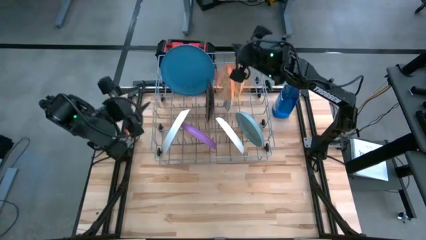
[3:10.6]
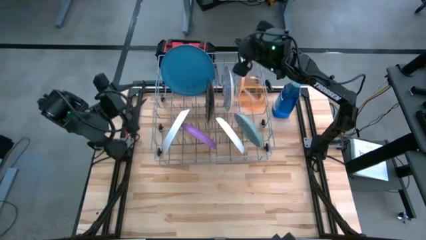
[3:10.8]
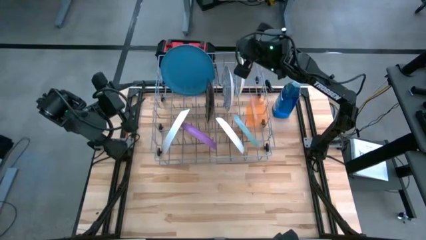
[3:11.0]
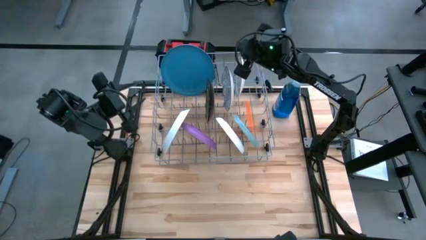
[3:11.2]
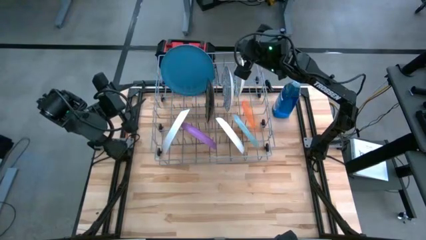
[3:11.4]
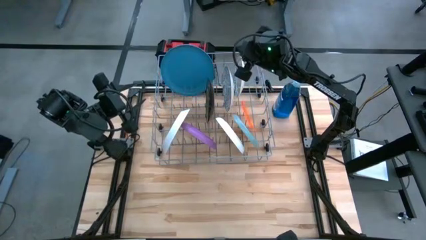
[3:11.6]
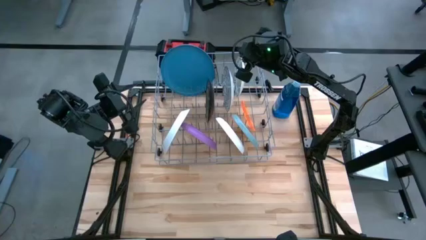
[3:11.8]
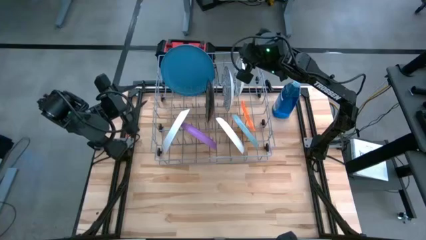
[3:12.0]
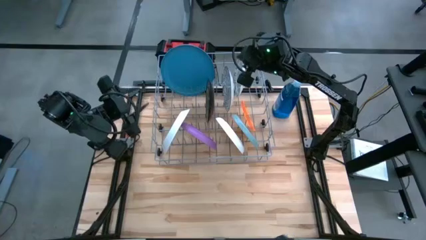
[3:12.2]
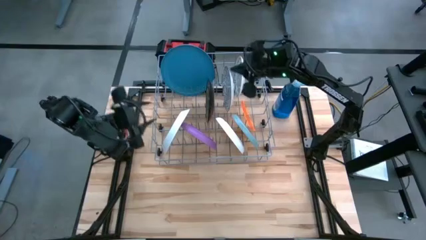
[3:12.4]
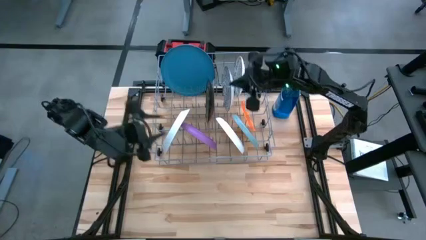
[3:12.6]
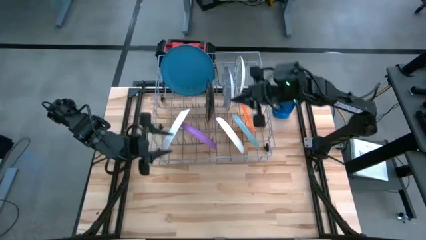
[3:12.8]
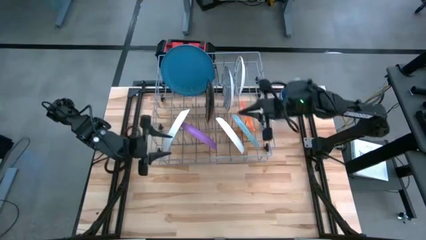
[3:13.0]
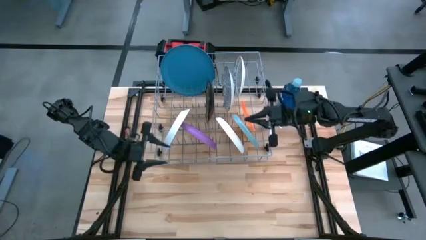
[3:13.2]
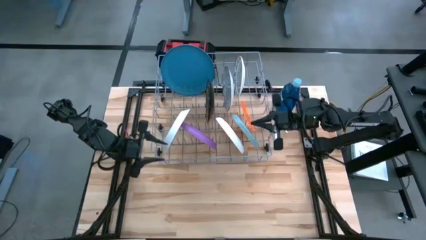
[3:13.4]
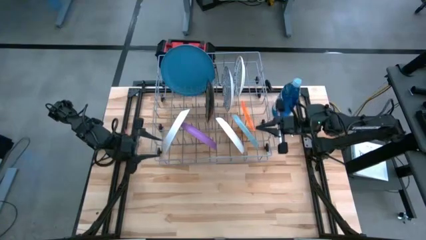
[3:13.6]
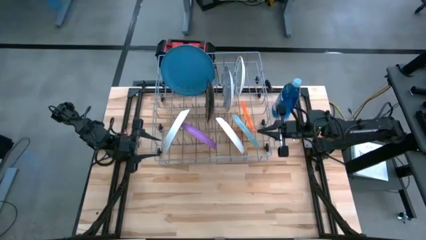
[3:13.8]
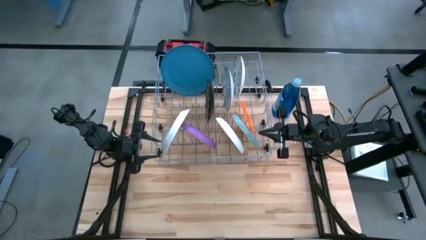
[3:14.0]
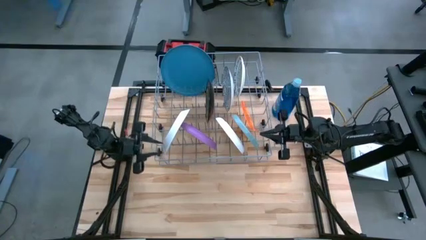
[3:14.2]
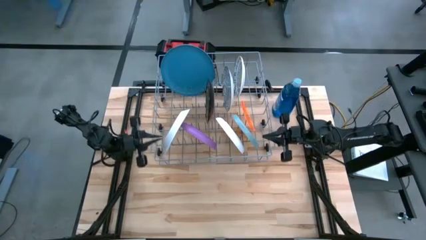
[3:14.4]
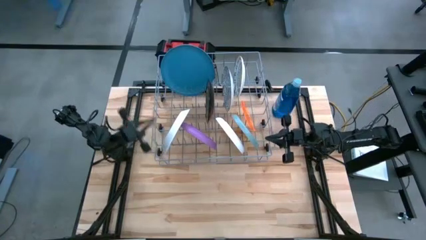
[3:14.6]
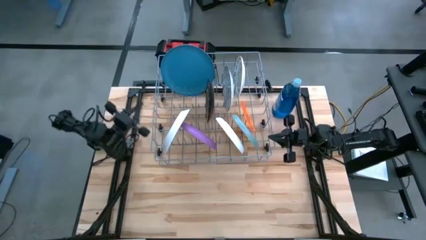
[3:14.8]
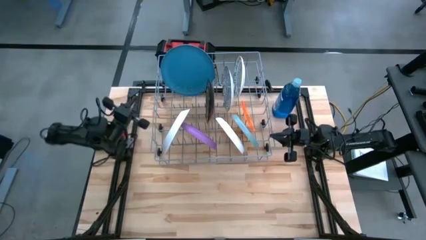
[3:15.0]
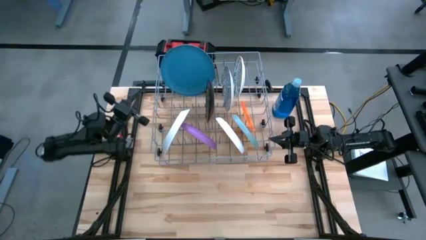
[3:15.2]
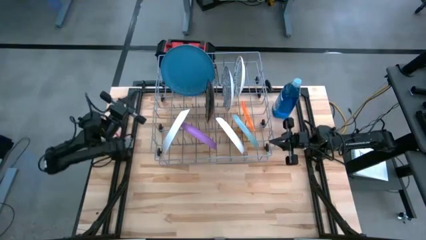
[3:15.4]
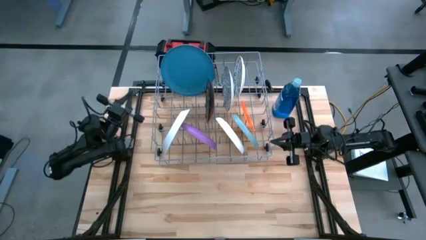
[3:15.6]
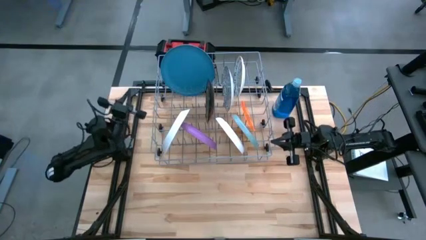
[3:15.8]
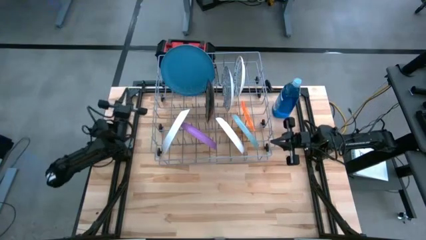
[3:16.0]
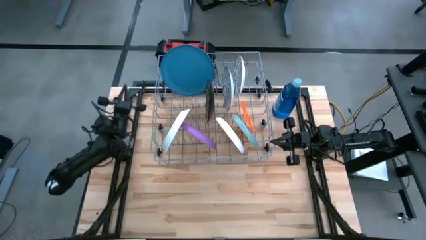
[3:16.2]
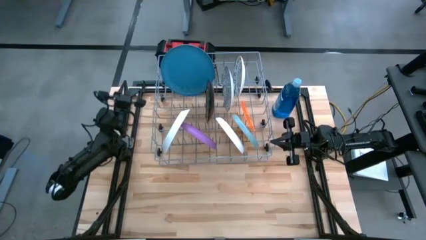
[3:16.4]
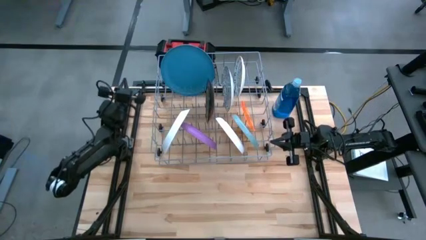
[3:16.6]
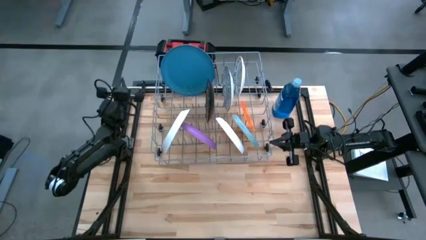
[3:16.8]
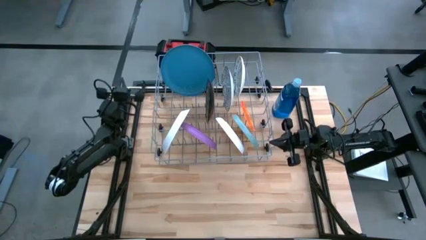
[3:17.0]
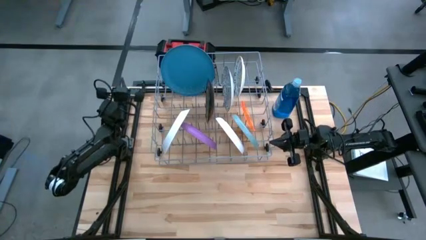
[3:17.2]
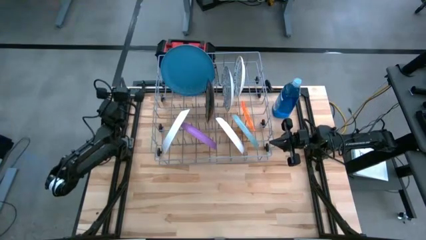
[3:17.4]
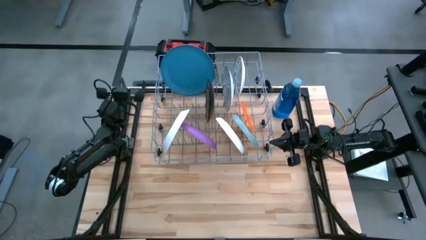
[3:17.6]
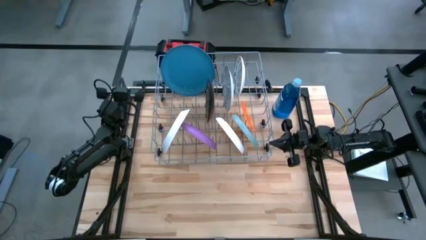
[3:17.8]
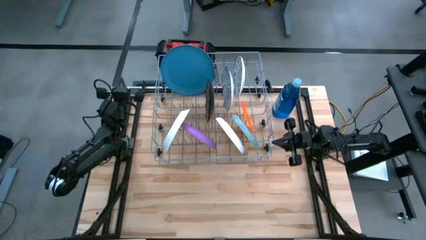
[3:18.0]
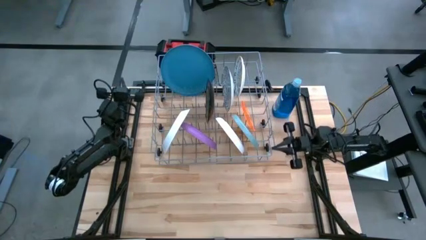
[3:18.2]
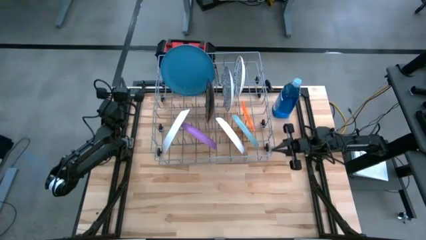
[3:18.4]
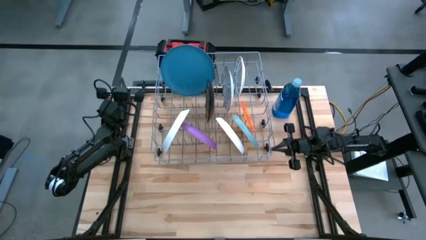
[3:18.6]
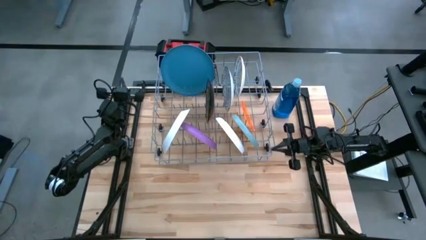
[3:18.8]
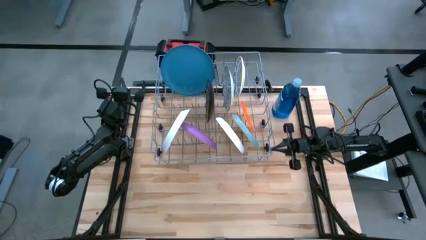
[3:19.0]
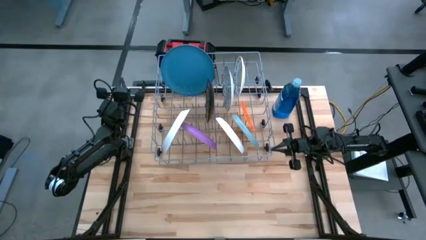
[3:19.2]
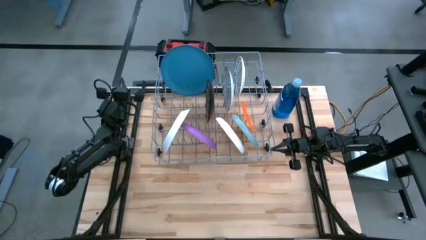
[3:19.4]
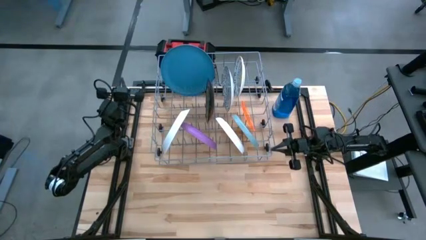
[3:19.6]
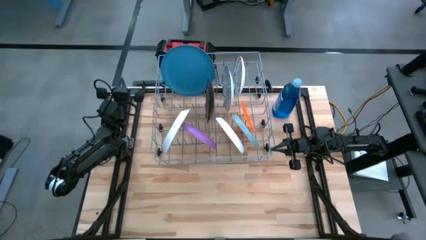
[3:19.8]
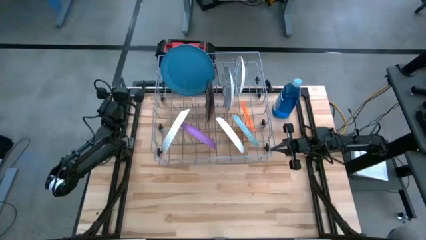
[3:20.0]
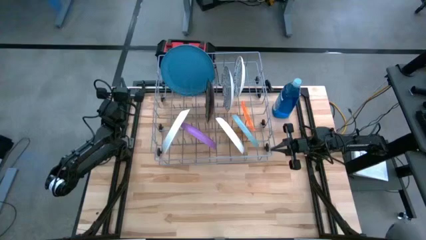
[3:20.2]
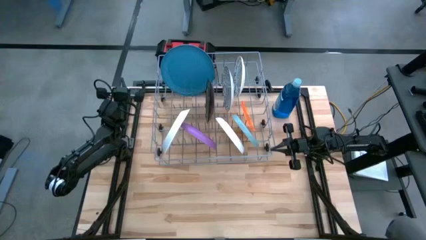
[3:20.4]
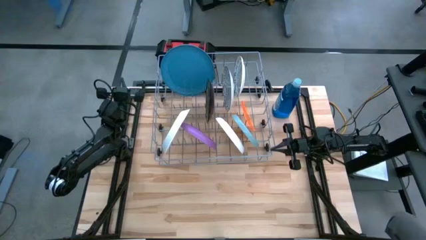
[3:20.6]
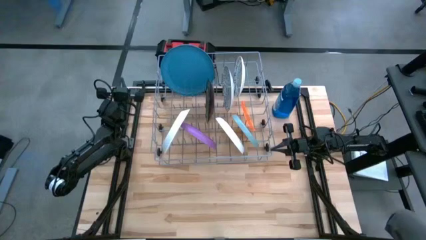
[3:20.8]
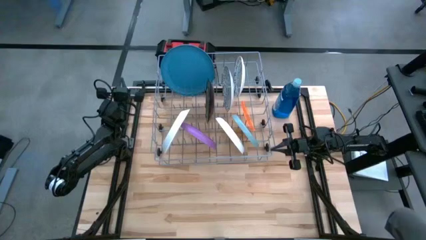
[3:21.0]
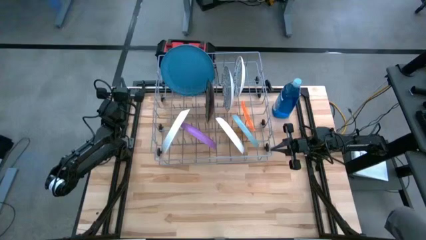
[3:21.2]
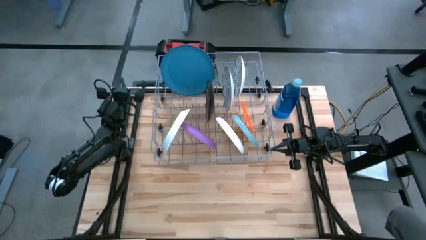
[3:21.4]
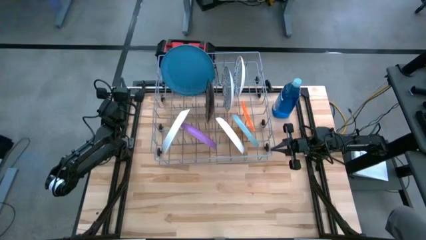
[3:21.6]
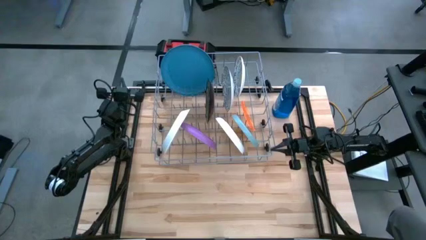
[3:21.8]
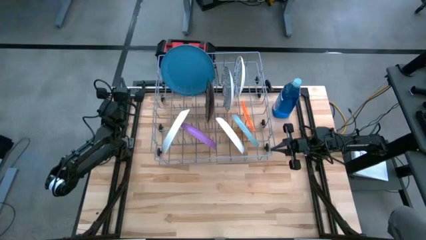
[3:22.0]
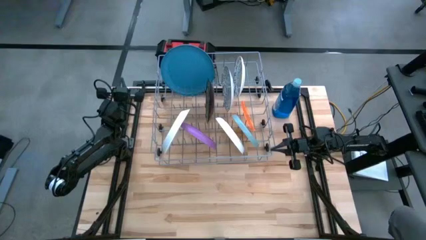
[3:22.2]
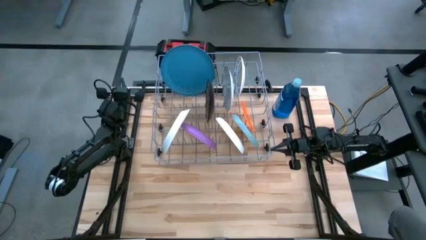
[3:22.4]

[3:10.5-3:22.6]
Task: Sort dishes
Return to Home Position
